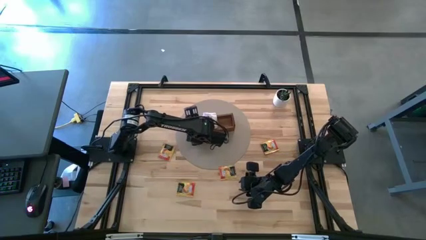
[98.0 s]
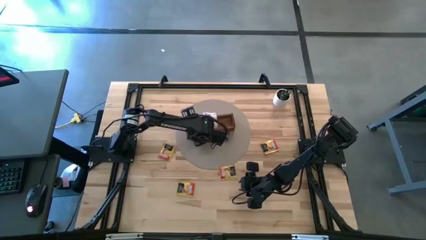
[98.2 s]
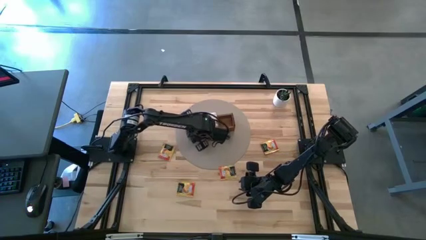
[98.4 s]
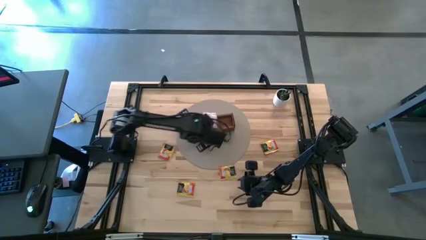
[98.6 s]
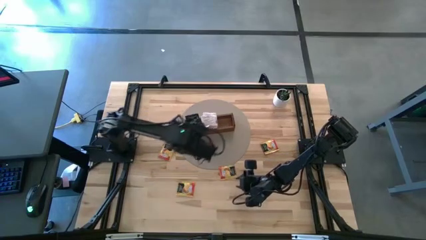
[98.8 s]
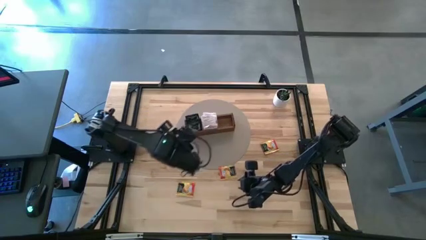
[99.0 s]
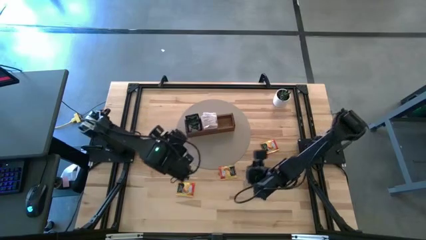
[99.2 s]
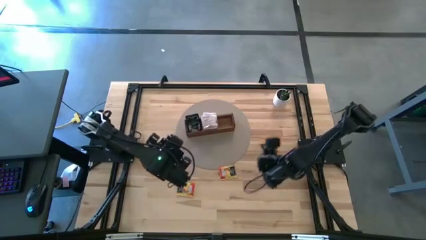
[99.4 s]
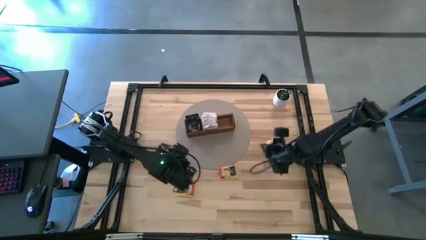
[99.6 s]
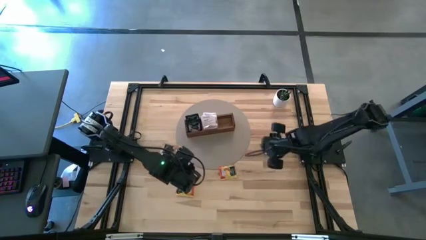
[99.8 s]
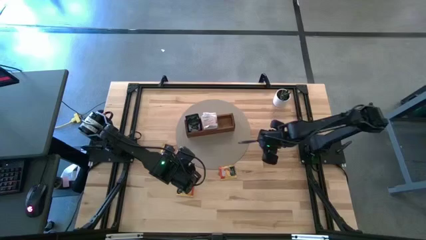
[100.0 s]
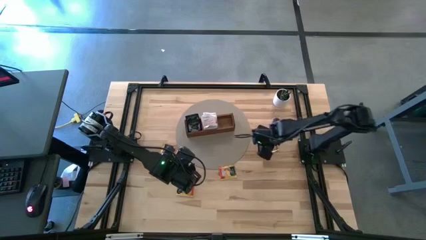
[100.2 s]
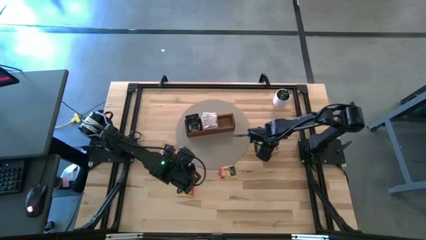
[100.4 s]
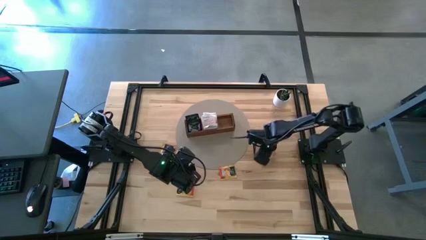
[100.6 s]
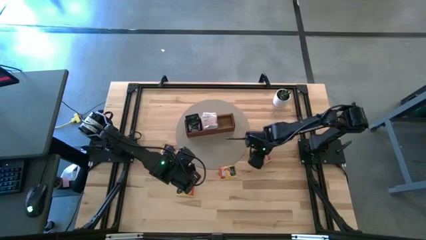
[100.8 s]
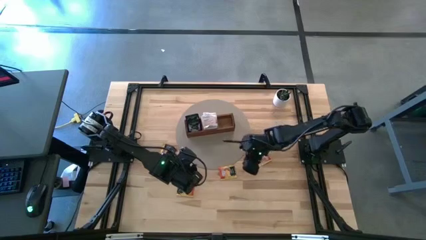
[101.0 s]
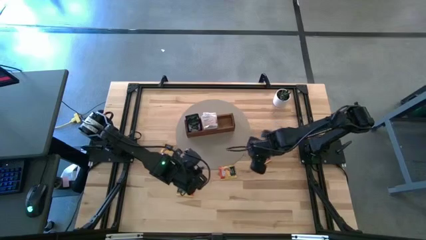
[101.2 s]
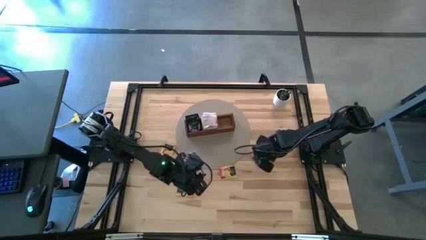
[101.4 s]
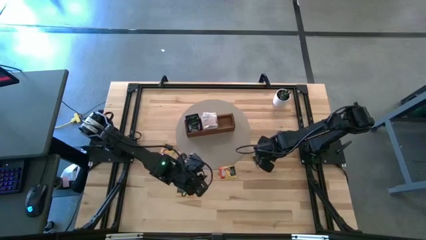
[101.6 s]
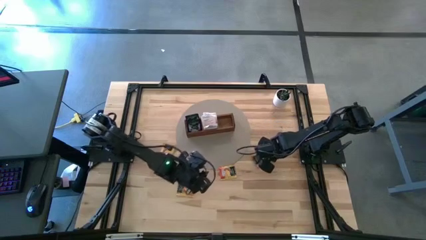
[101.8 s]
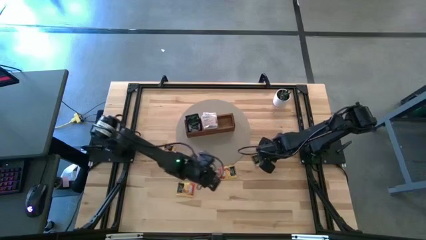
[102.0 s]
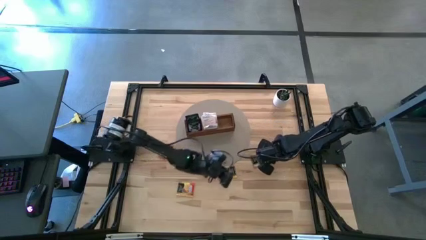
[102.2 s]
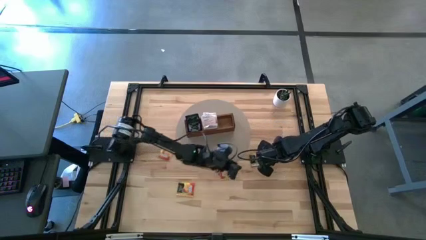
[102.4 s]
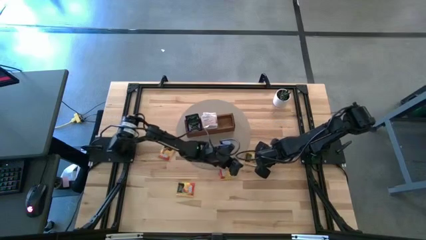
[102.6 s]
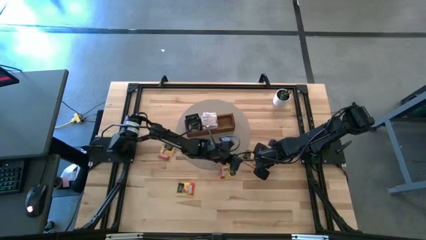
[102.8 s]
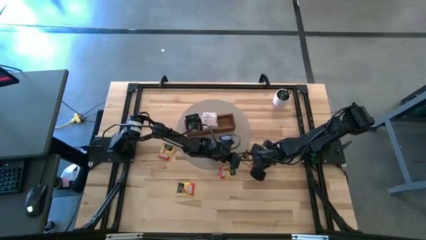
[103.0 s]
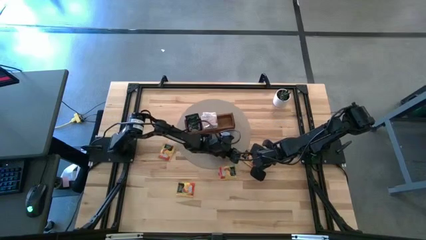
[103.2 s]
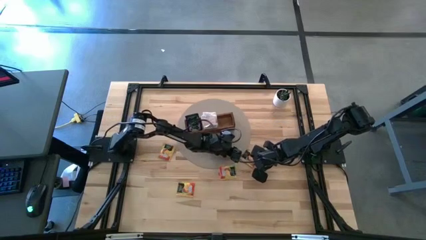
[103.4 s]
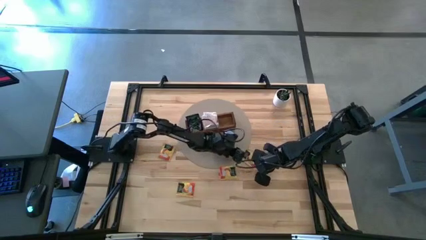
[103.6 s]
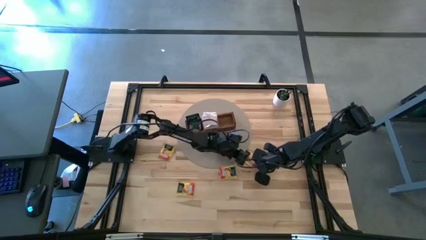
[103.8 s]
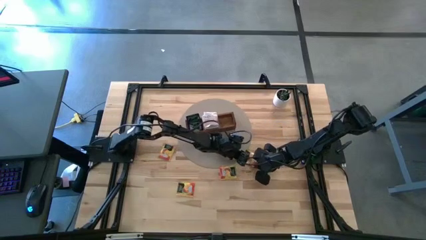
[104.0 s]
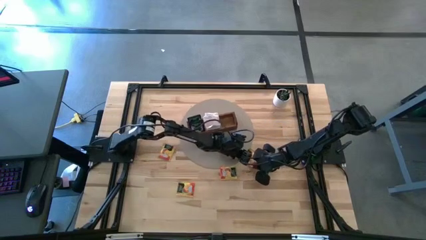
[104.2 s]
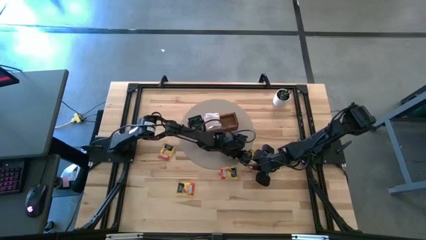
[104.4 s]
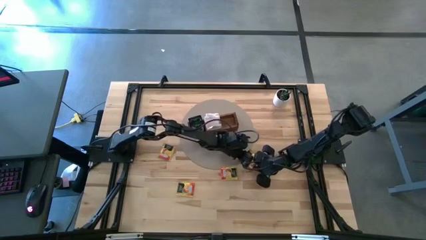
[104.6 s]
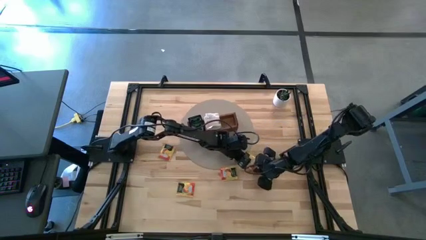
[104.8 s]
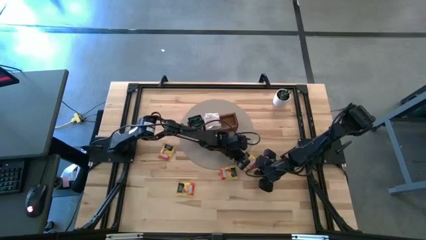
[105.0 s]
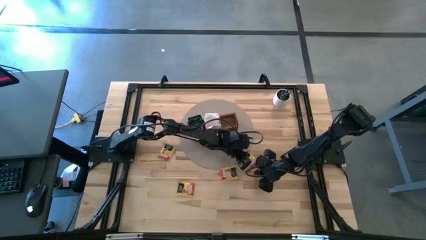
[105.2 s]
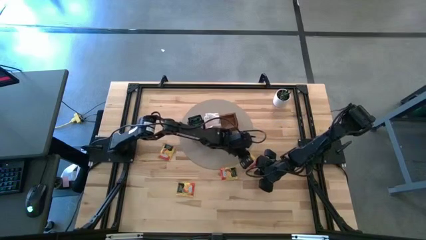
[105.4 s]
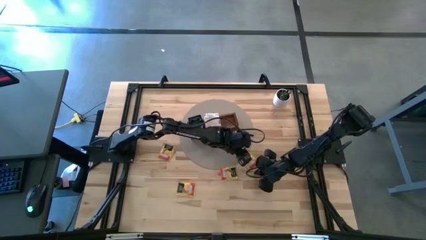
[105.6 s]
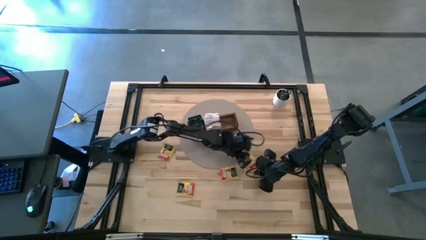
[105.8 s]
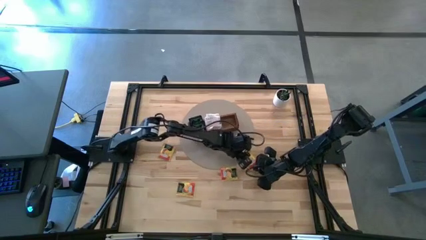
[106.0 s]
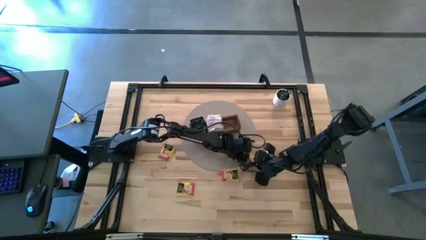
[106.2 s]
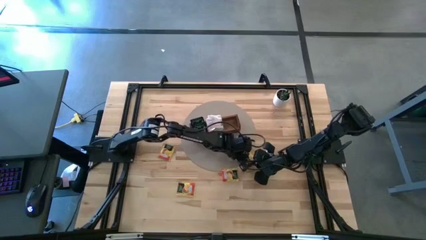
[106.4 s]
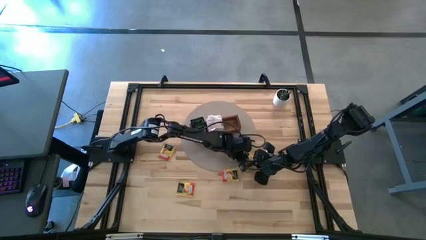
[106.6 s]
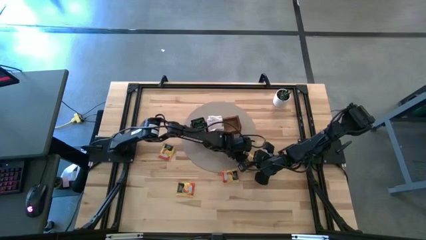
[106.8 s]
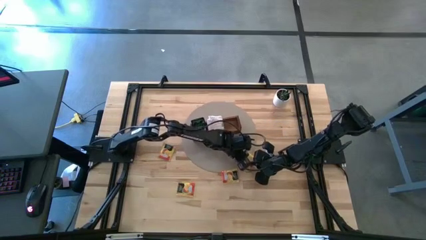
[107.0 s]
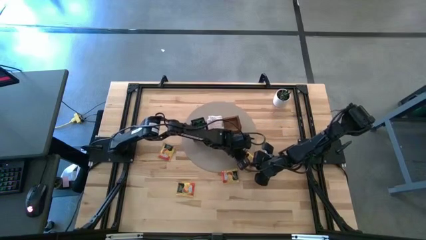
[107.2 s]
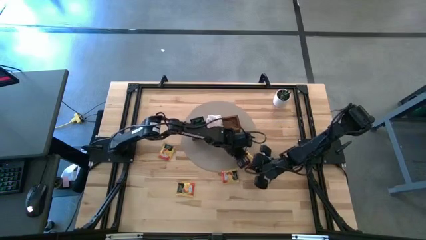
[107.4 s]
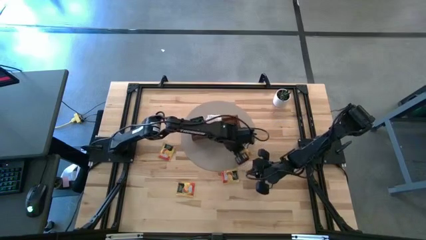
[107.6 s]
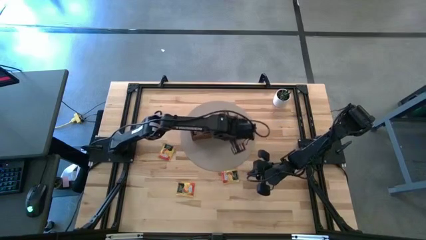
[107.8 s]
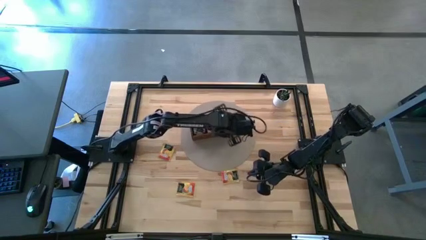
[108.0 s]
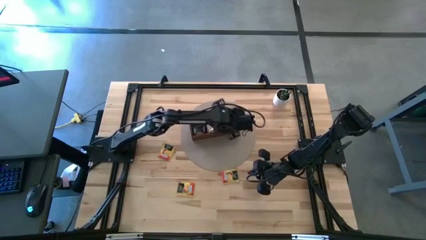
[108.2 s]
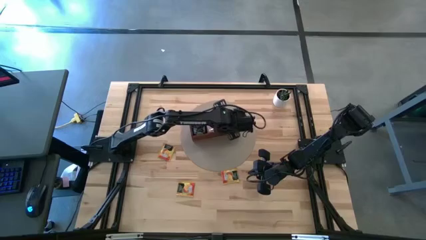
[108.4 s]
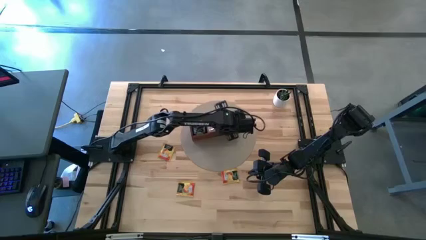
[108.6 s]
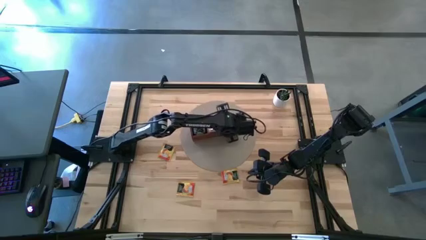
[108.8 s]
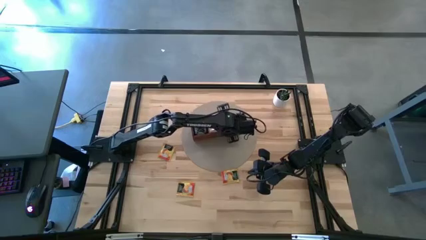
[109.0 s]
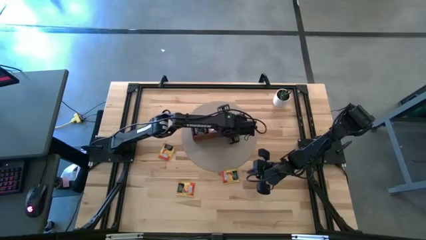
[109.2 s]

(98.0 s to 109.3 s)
Task: Pick & Place Tea
Put the yellow tea bag into the right section of the wooden organizer

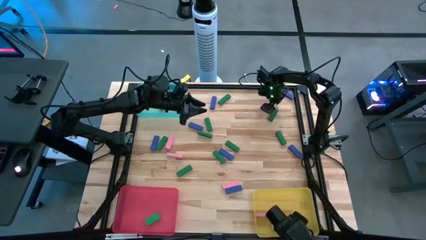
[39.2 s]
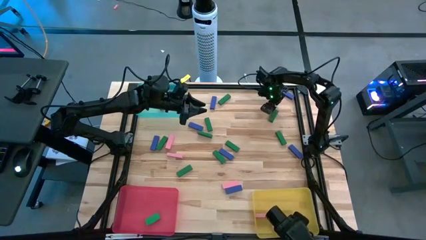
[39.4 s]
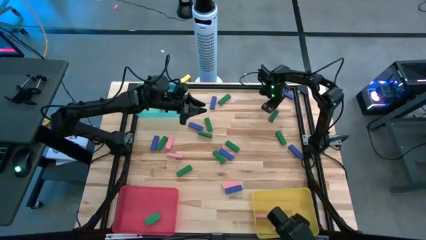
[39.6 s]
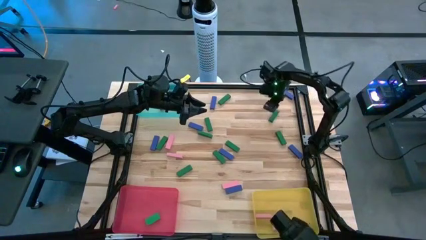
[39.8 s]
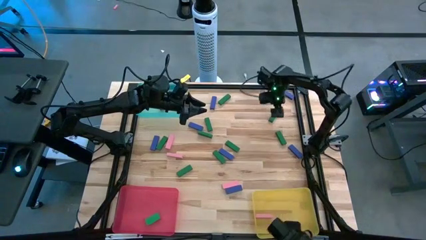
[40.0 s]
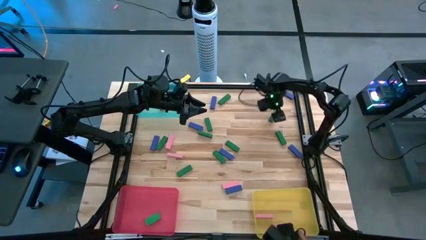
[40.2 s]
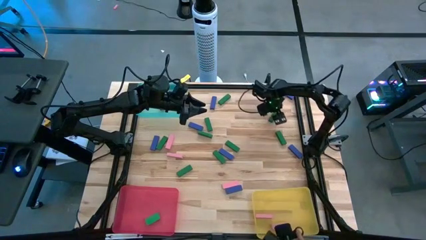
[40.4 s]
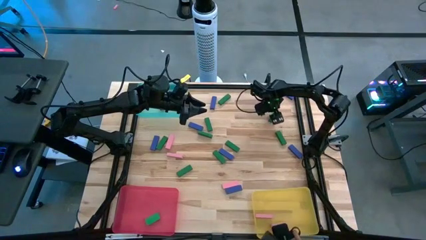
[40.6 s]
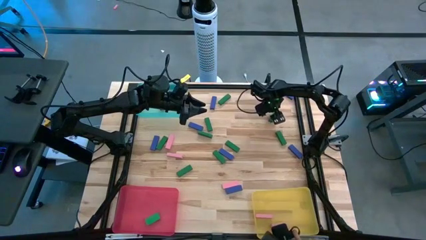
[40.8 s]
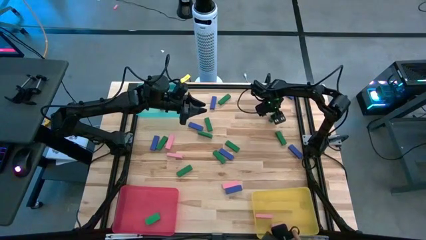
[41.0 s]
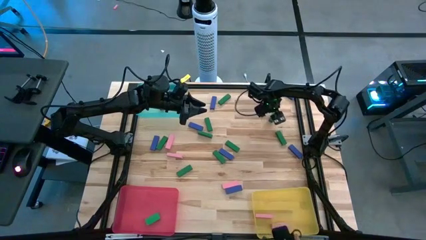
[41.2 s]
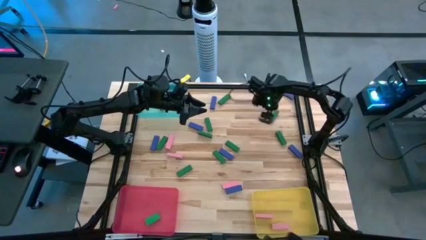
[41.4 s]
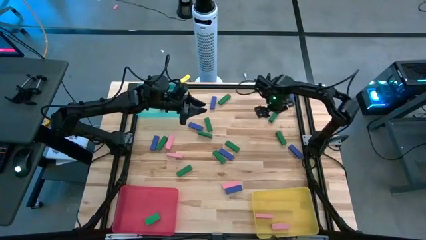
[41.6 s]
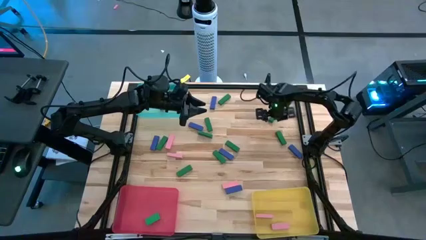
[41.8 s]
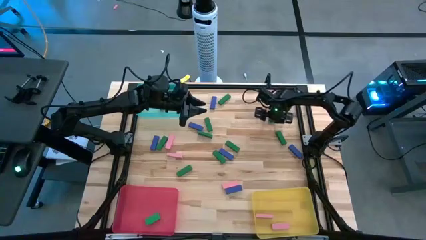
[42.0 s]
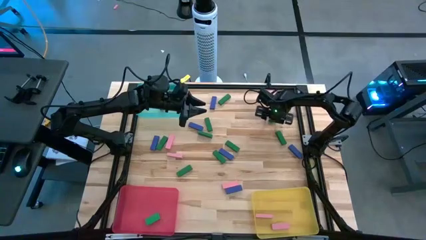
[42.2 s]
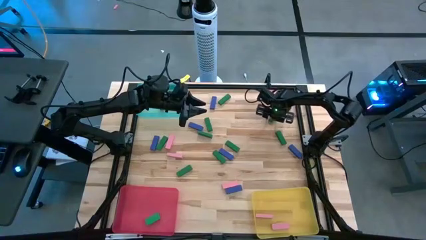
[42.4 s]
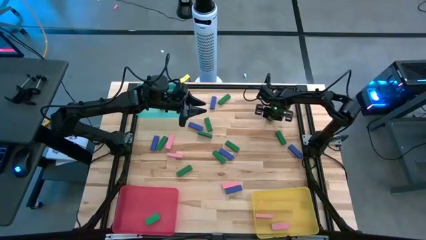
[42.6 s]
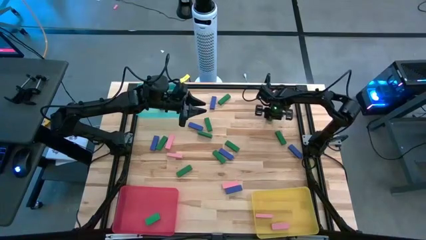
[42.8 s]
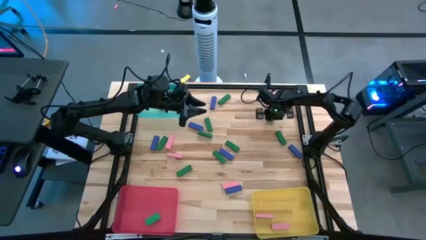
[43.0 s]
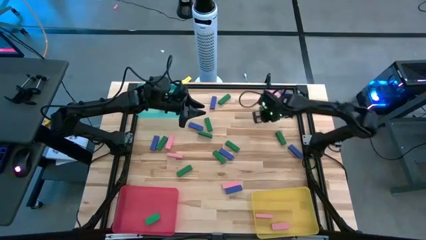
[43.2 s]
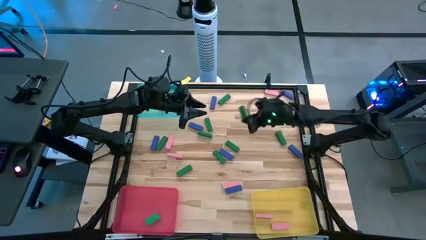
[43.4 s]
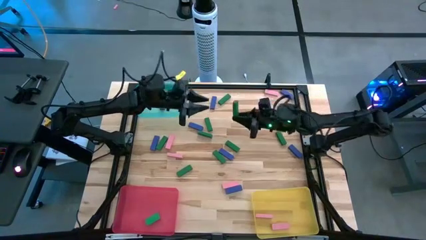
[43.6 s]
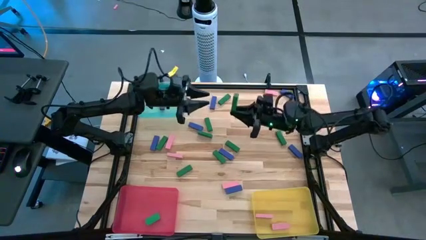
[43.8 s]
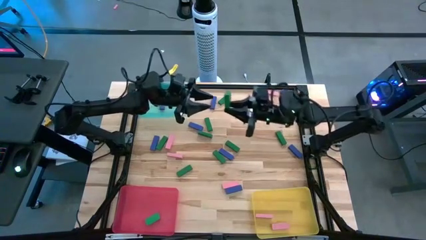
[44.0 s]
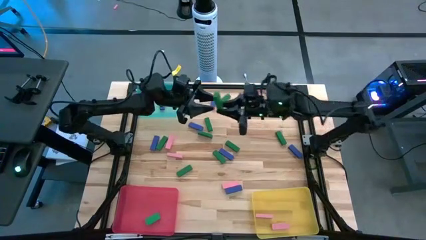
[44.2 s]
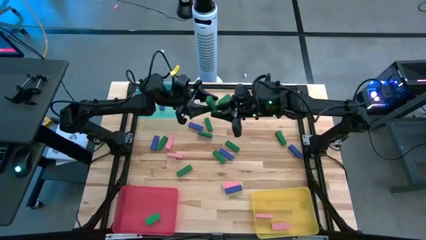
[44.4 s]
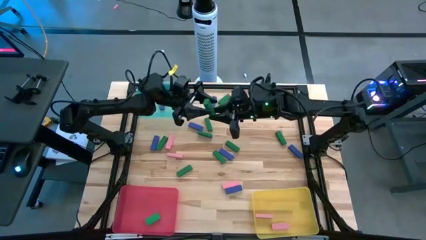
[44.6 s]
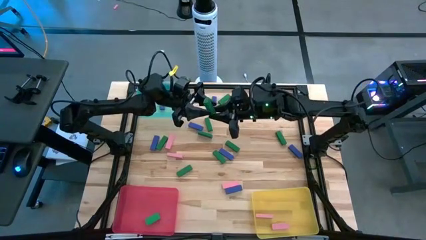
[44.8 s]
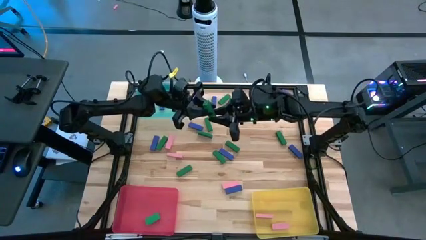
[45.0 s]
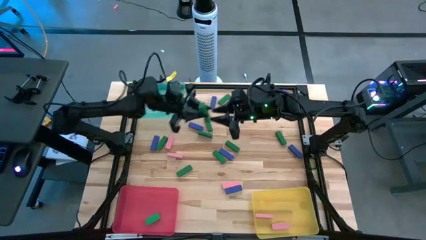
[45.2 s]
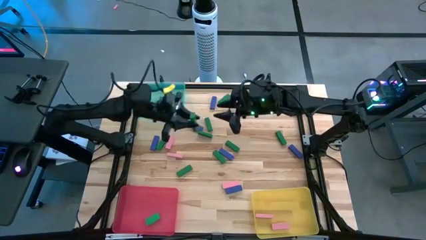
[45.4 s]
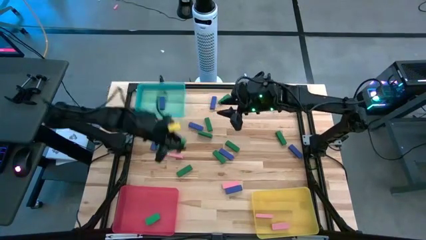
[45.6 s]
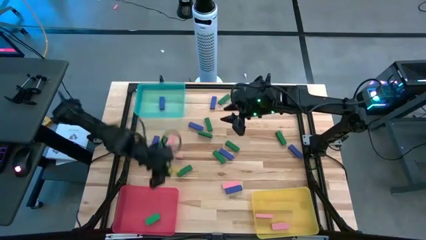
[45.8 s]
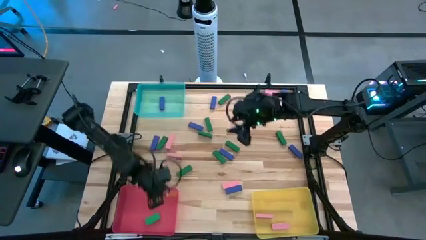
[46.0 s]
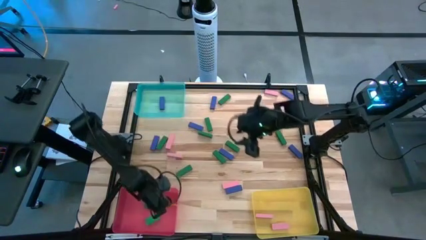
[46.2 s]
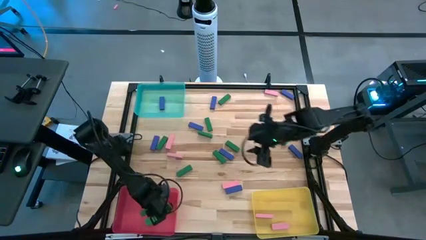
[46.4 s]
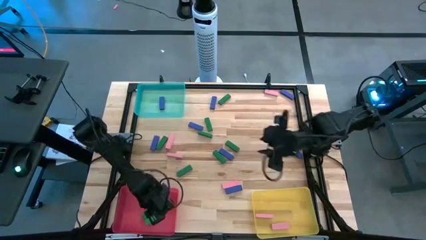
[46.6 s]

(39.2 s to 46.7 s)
Task: Sort blocks
Put the green block into the red bin
